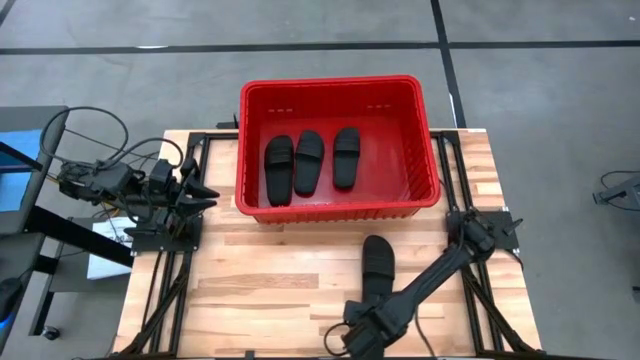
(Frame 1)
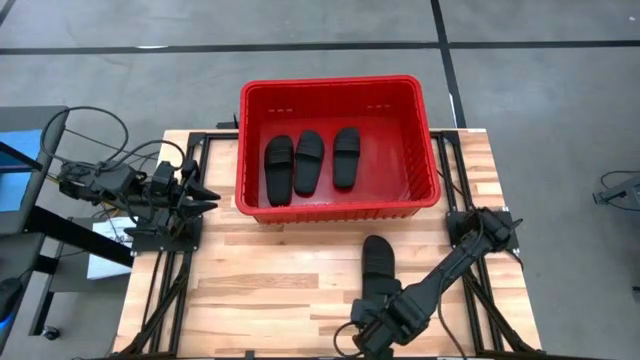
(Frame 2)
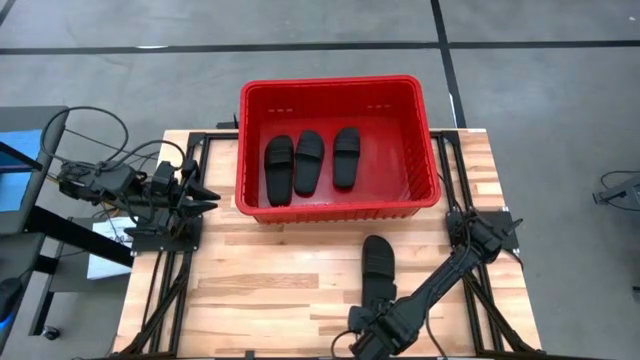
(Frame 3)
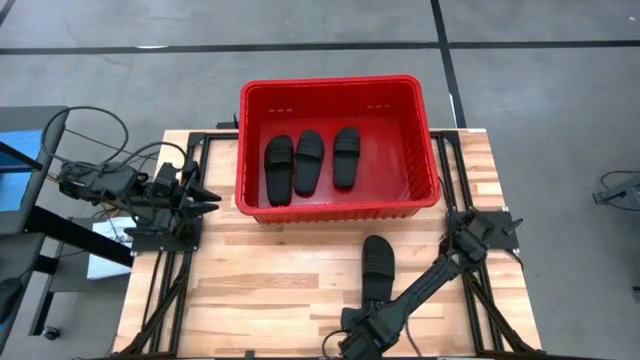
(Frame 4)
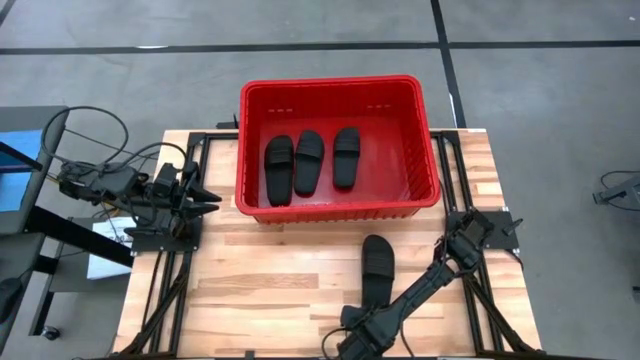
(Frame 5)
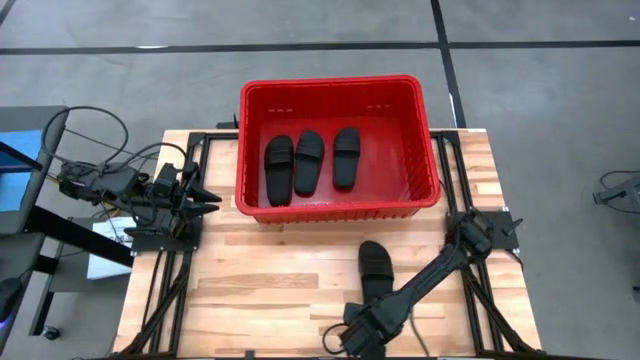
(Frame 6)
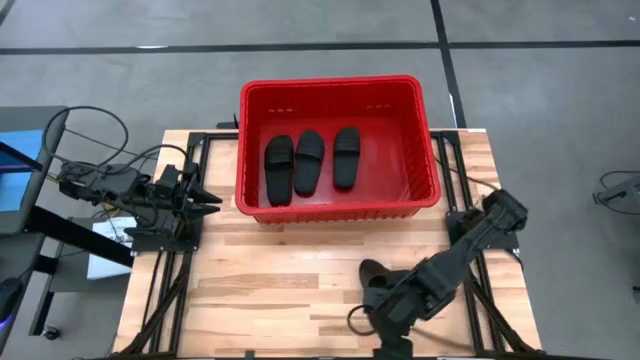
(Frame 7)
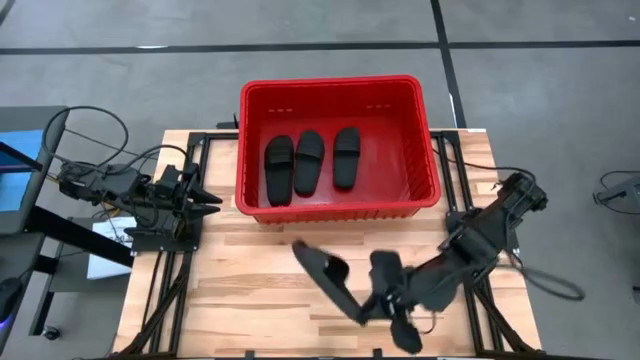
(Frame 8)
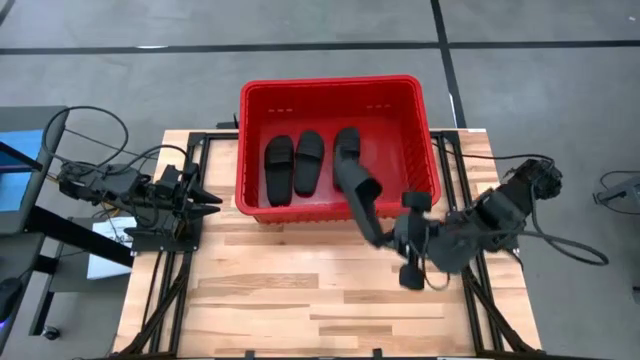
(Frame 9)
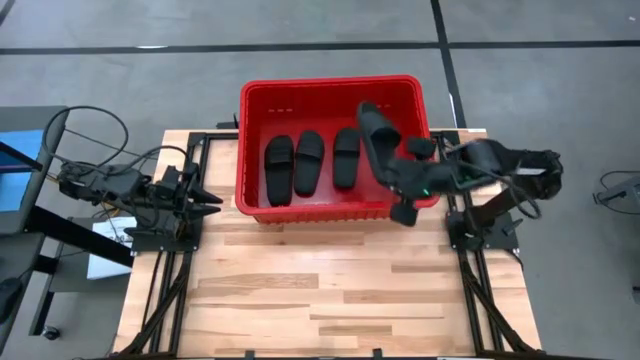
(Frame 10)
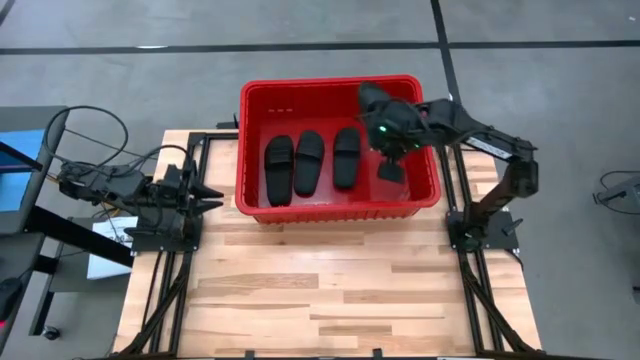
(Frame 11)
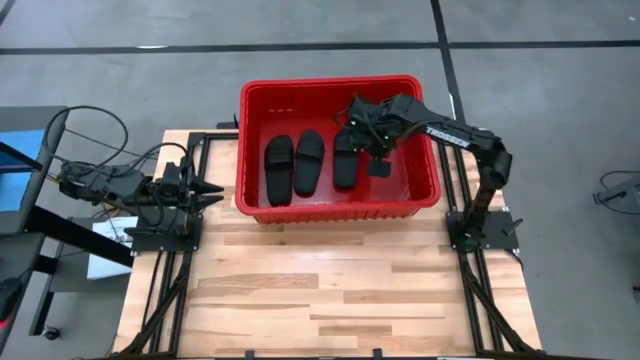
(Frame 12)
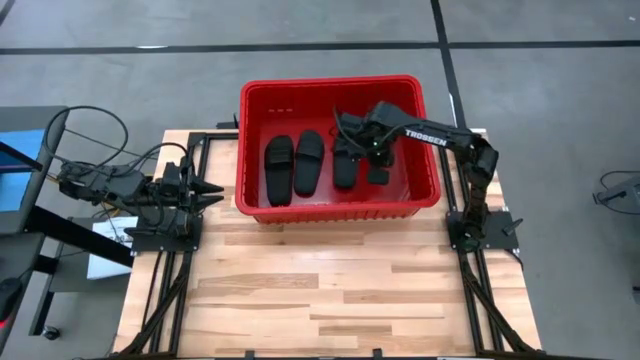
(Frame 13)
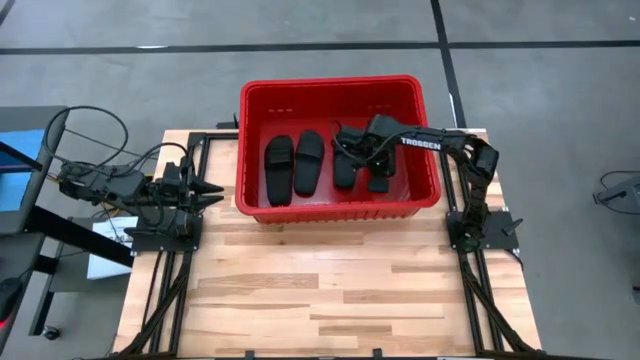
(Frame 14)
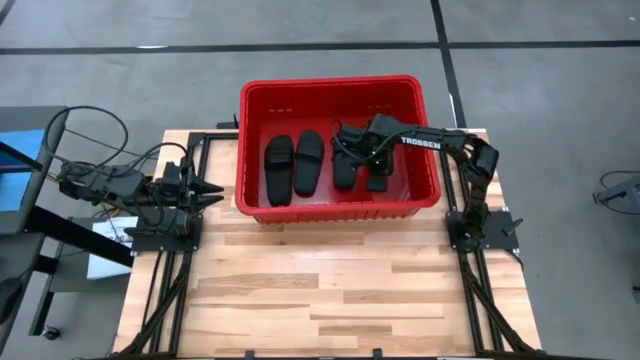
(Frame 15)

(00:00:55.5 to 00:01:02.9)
Task: Pick and place slides into bin
Put the black slide into the red container

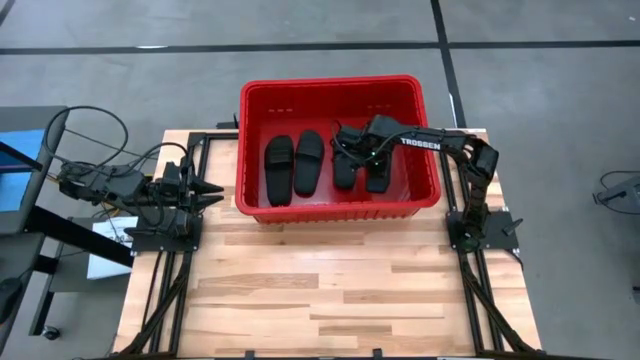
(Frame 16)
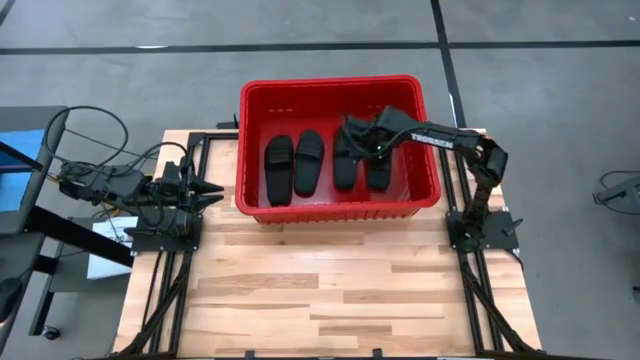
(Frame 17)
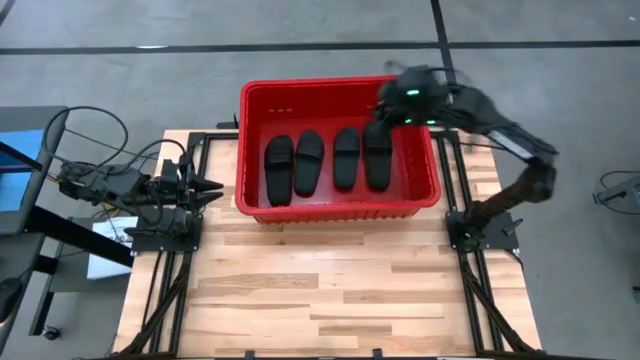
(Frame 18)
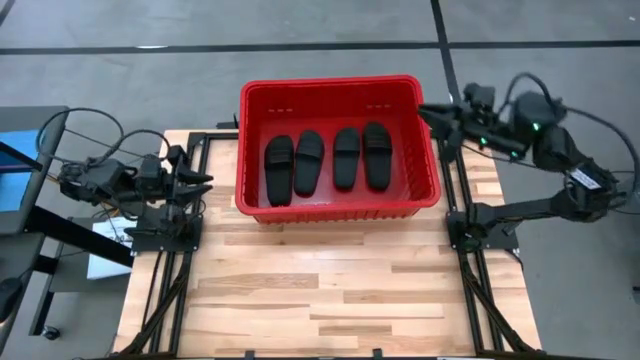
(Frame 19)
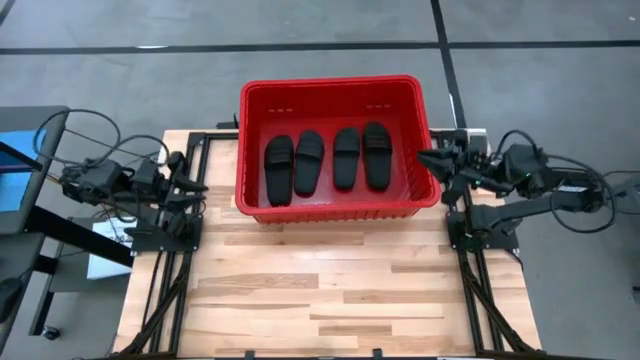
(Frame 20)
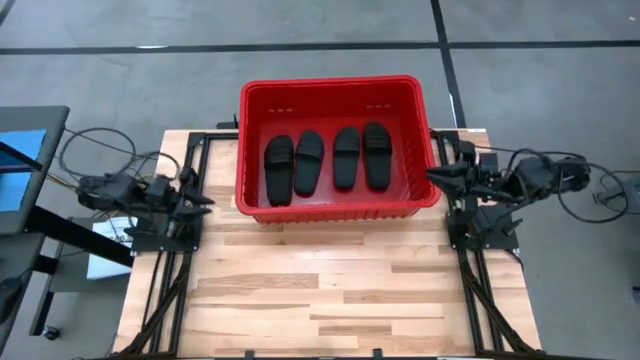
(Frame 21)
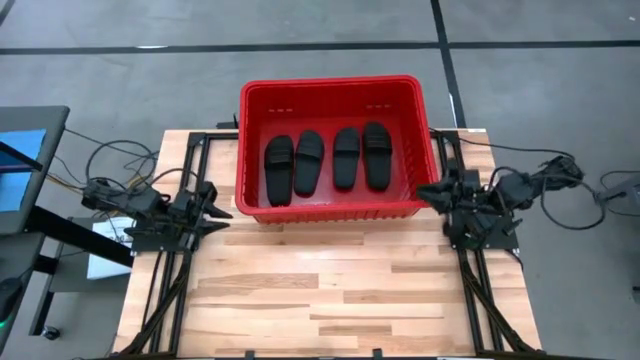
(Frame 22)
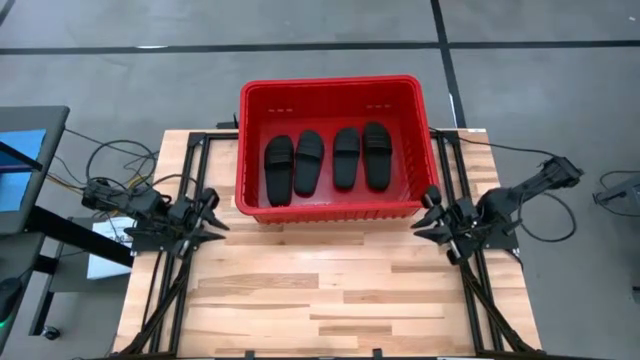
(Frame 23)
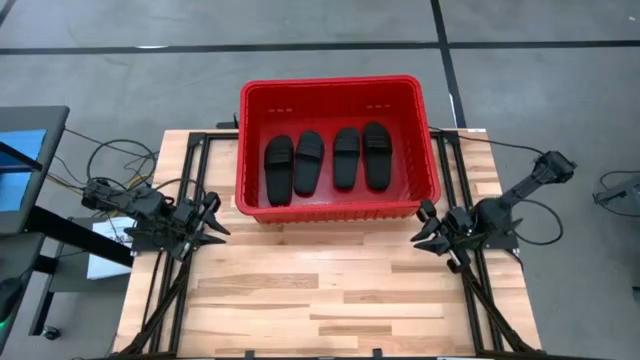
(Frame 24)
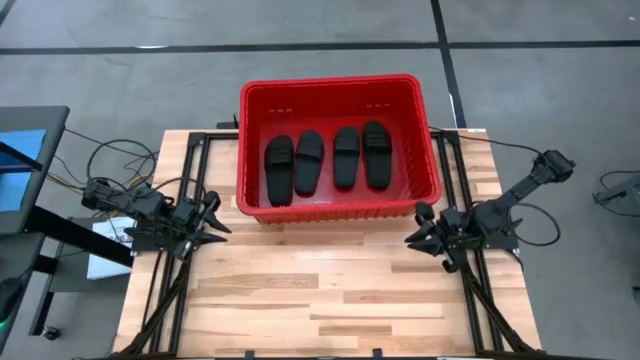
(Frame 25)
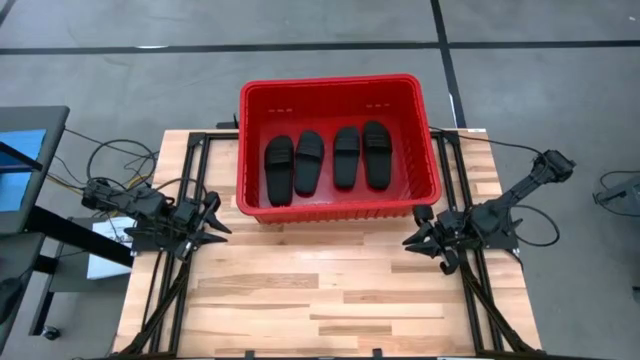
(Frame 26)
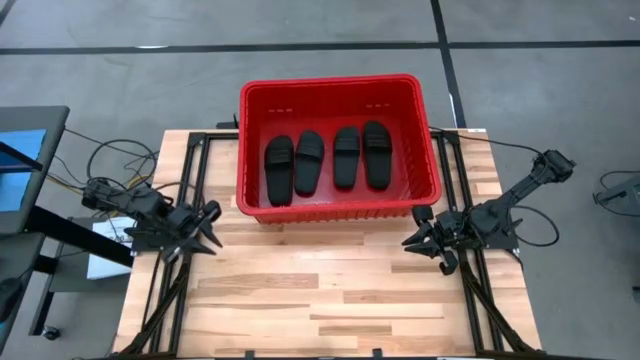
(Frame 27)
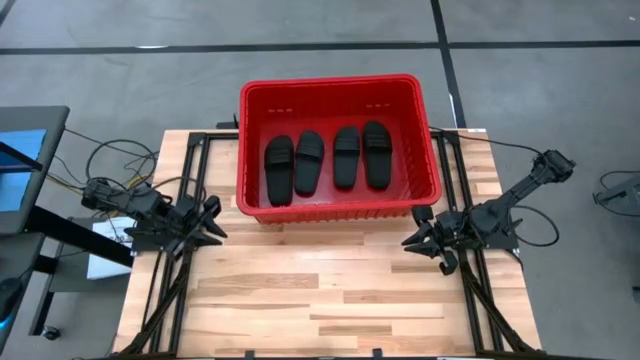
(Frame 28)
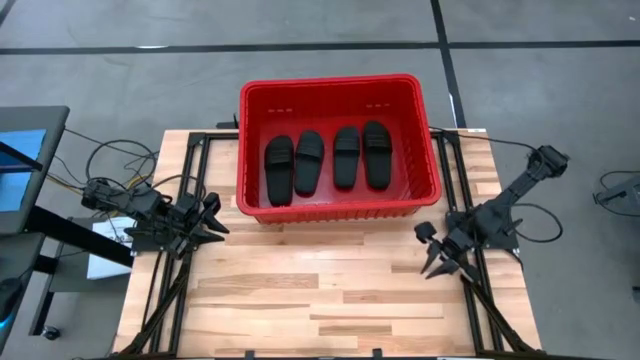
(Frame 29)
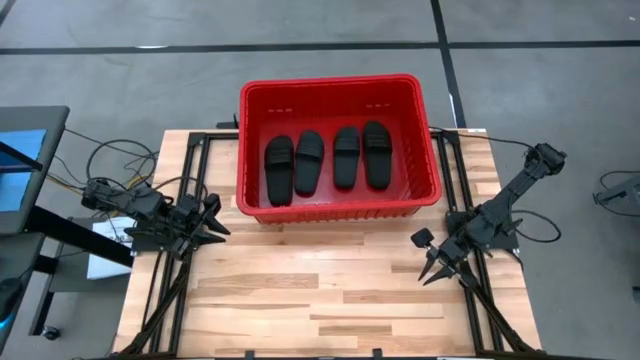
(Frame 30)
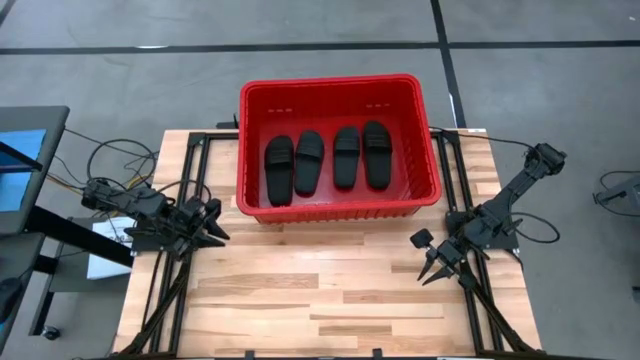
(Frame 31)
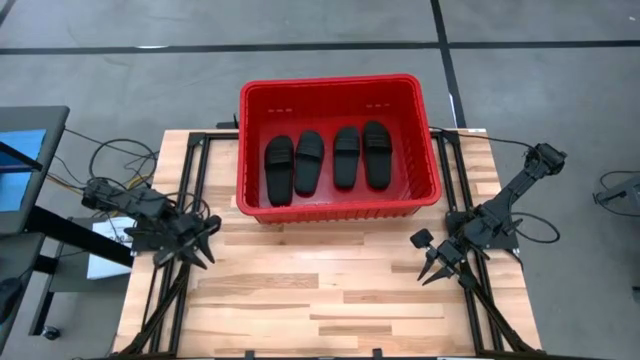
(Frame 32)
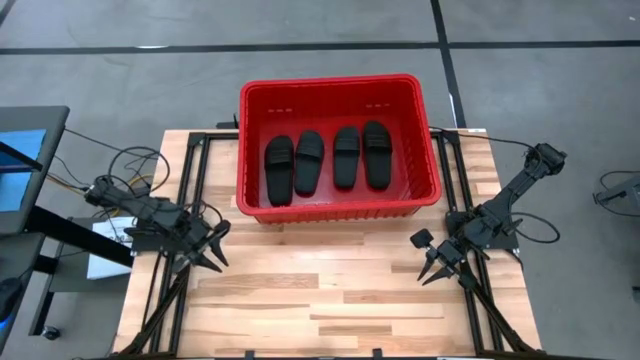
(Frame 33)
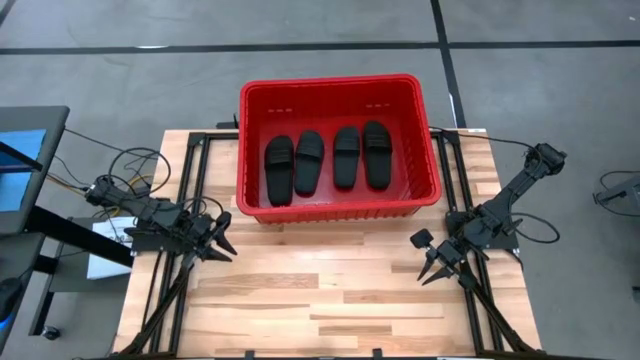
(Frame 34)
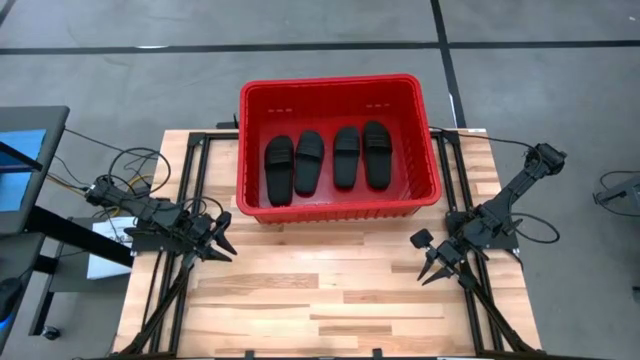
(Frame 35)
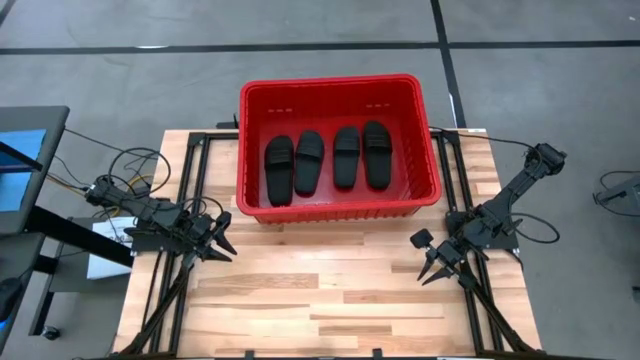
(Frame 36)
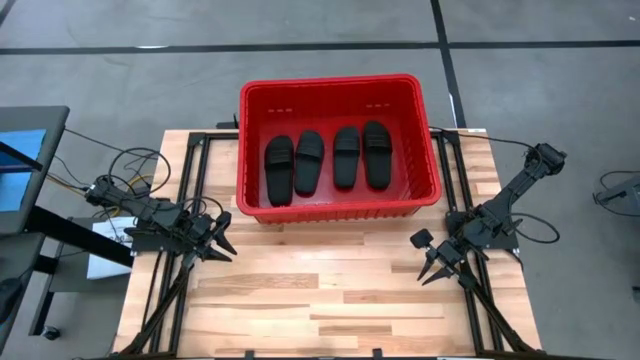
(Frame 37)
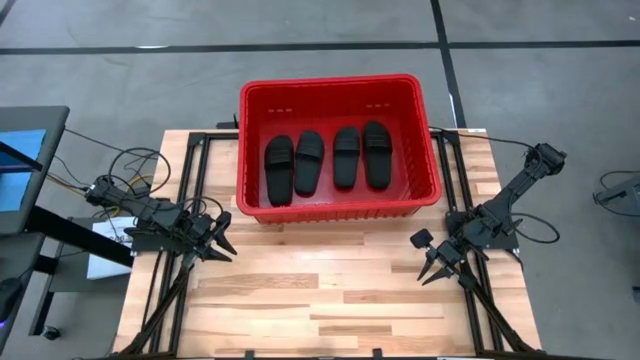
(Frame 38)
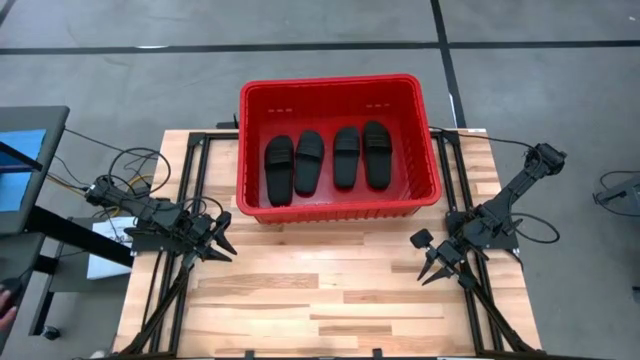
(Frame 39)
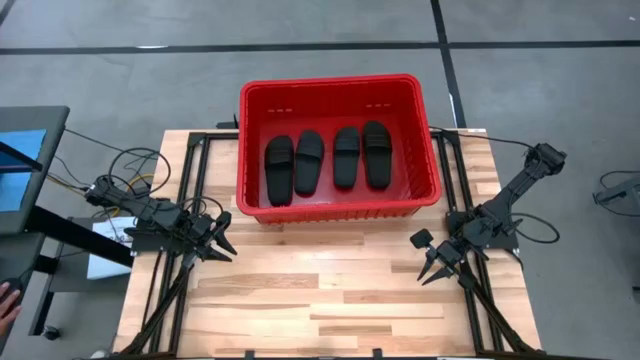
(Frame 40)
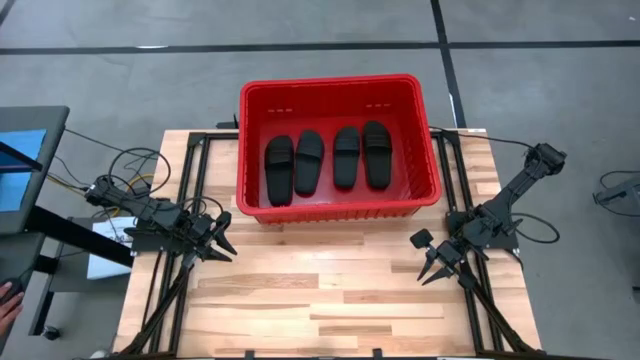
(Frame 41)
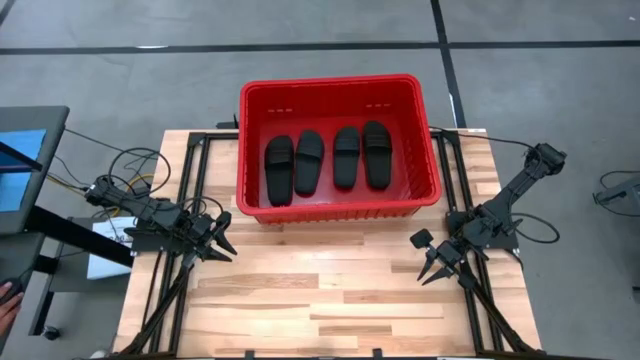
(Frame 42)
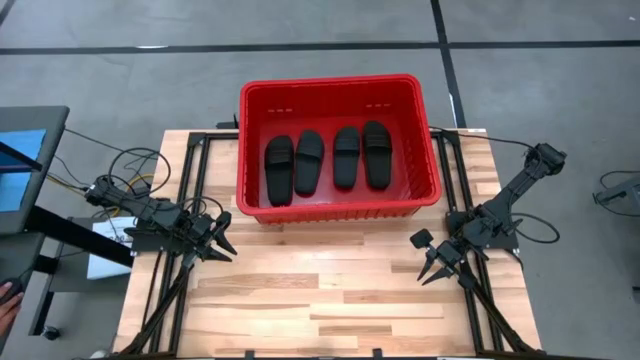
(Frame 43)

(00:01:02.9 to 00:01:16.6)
Return to Home Position
